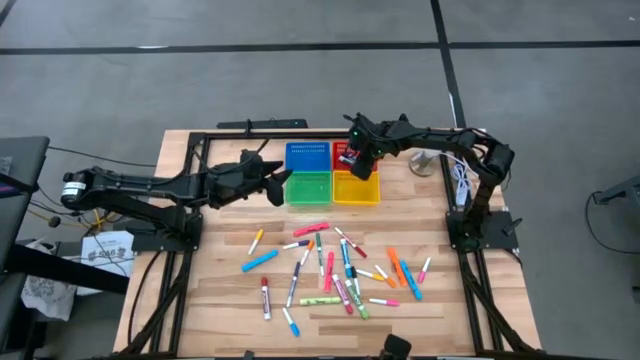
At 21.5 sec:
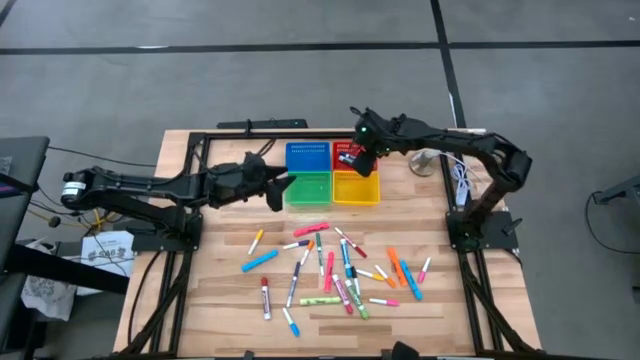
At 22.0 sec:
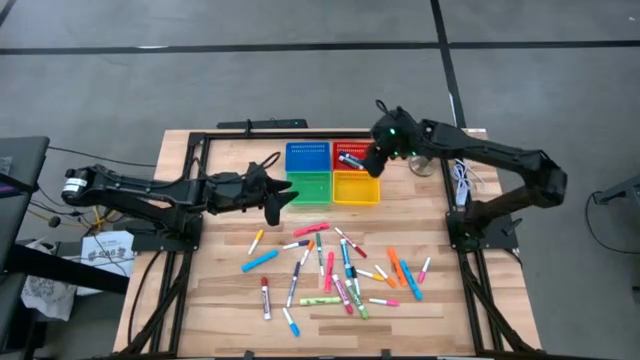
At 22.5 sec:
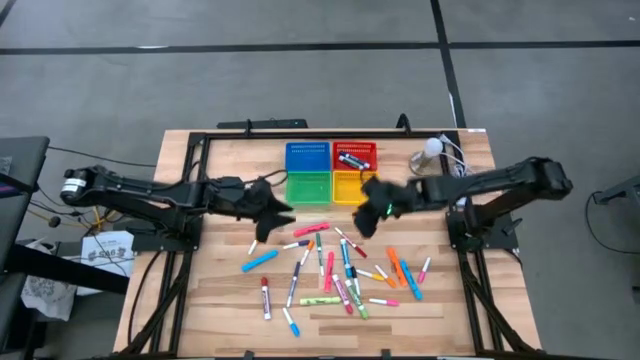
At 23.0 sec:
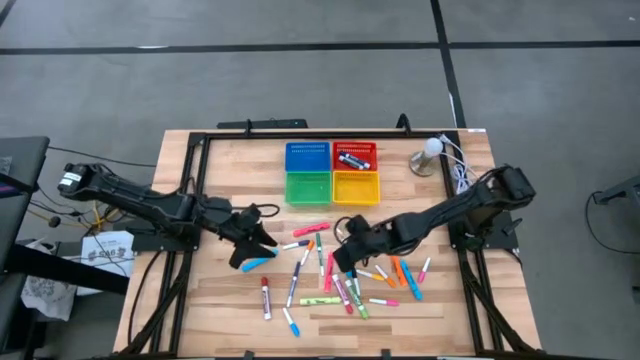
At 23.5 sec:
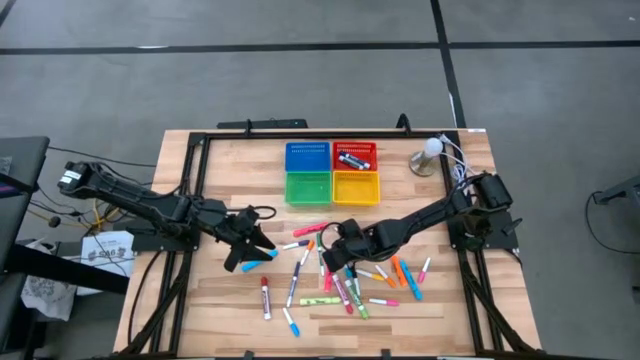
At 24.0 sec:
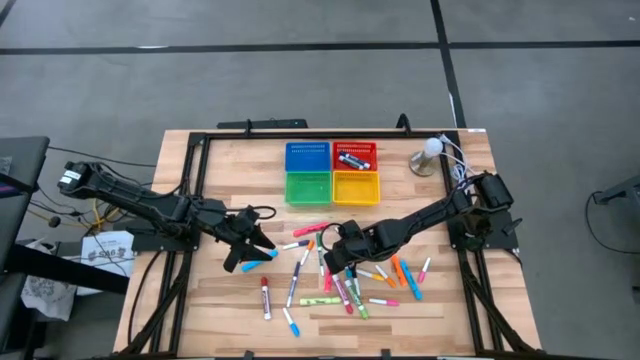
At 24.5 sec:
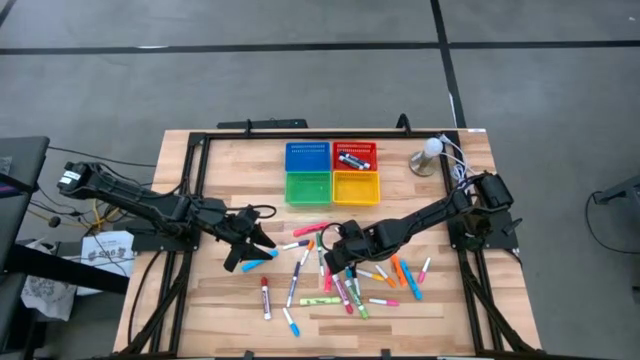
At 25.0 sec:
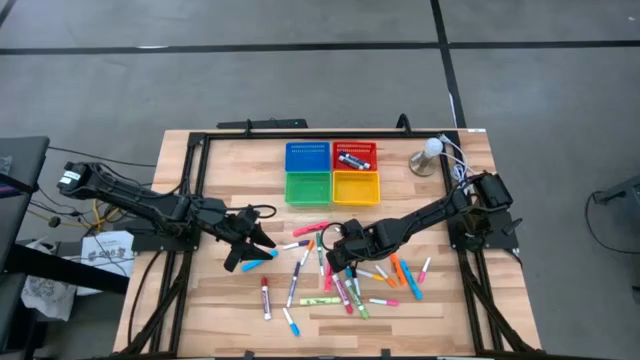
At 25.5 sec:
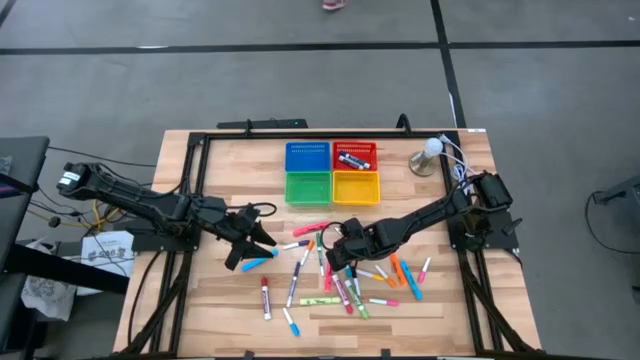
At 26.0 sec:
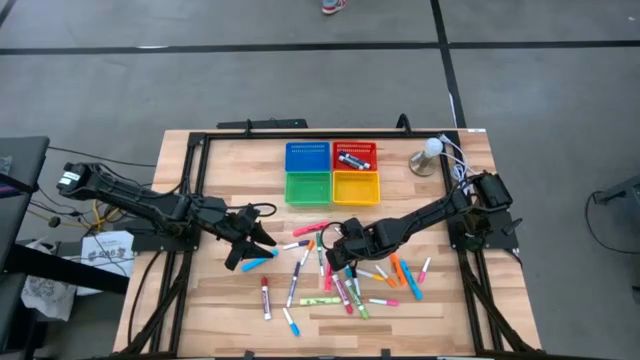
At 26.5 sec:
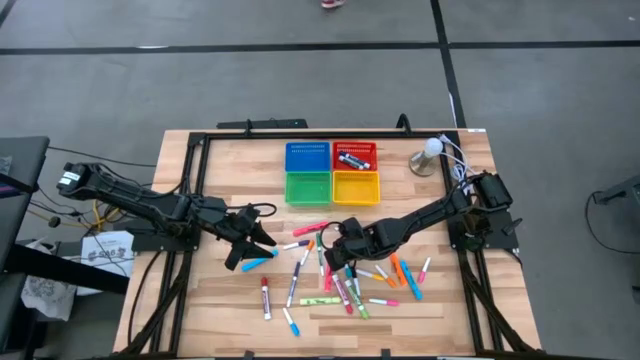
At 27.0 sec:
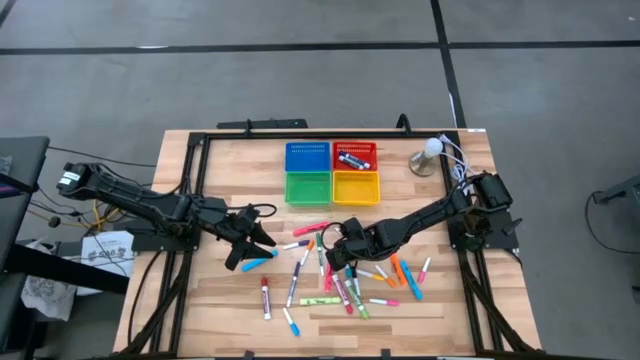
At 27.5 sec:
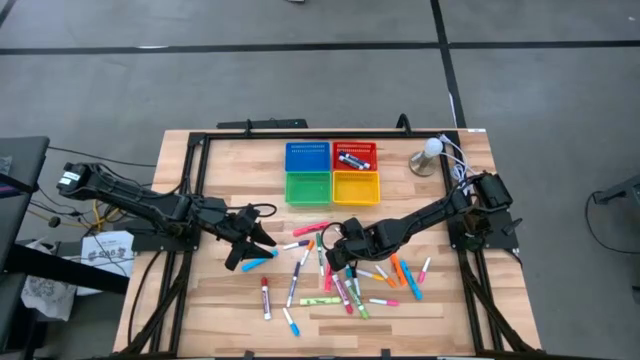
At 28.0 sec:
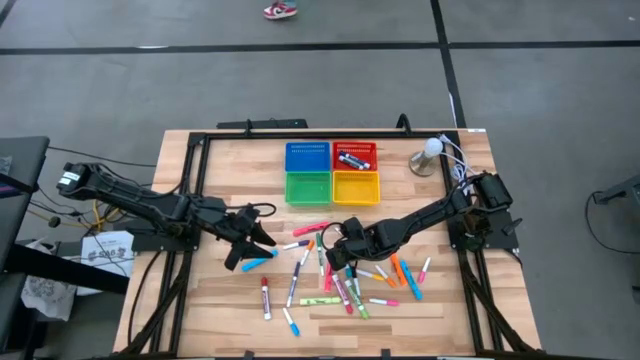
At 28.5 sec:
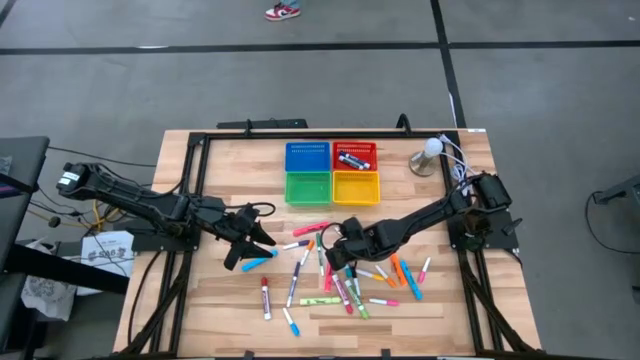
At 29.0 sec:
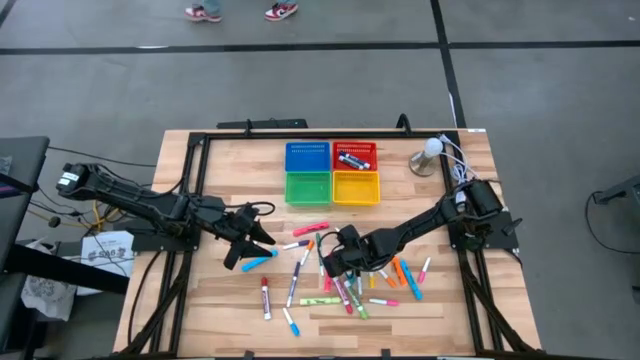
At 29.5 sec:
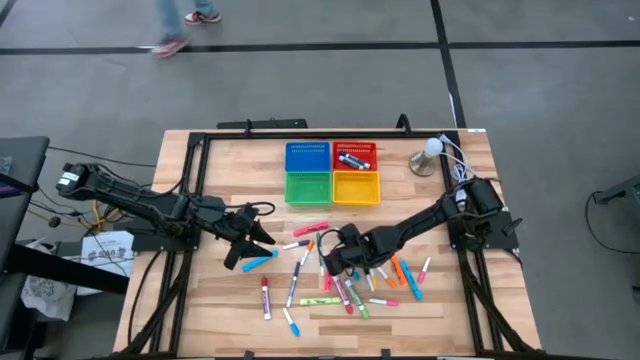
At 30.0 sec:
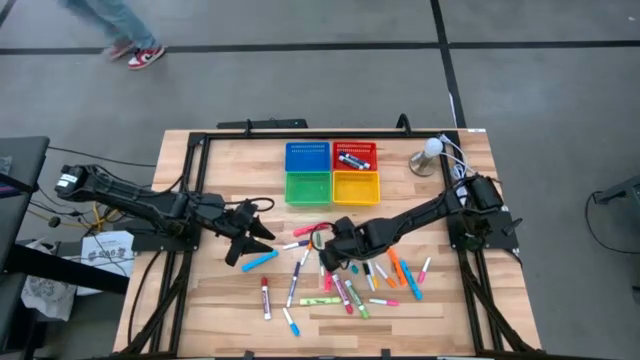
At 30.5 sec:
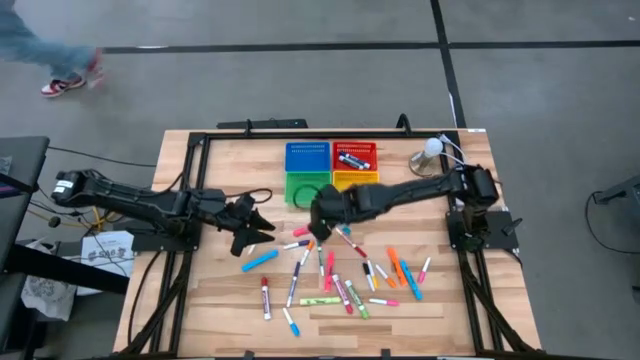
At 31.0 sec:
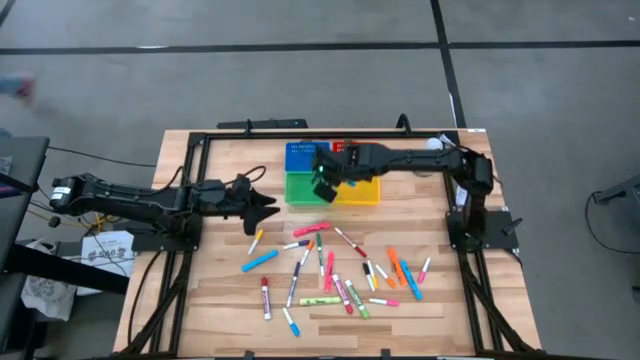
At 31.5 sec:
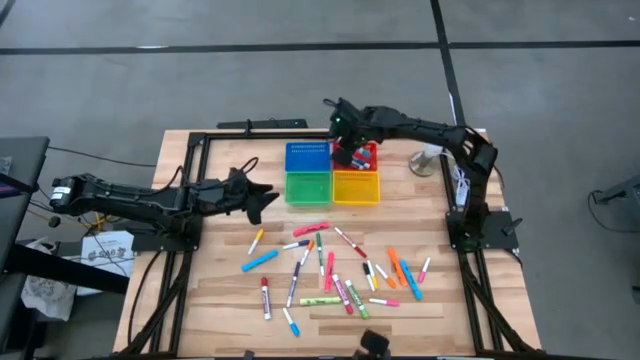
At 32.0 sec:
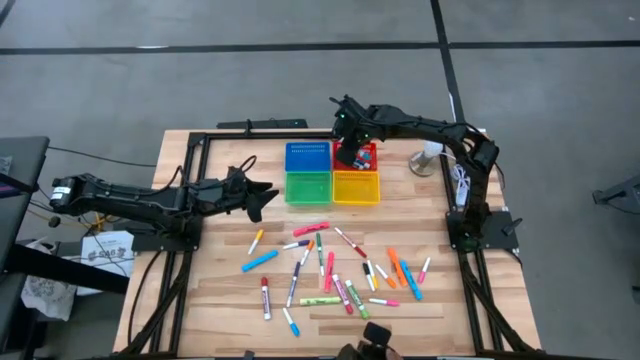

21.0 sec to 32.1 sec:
Task: Pick & Place Markers
Put the light blue thick dry erase marker into the red bin

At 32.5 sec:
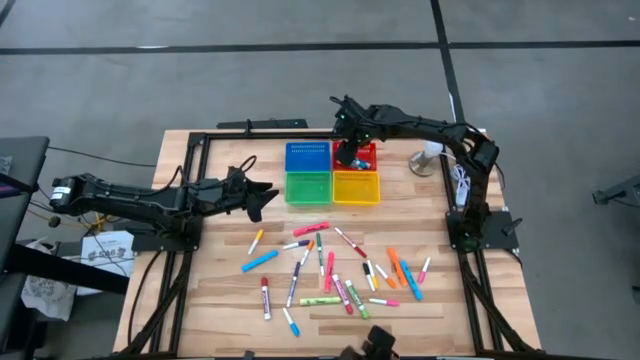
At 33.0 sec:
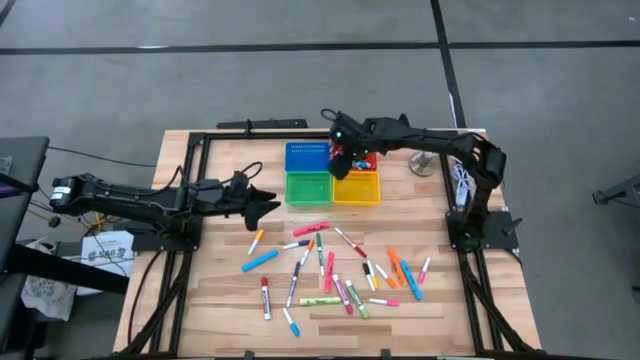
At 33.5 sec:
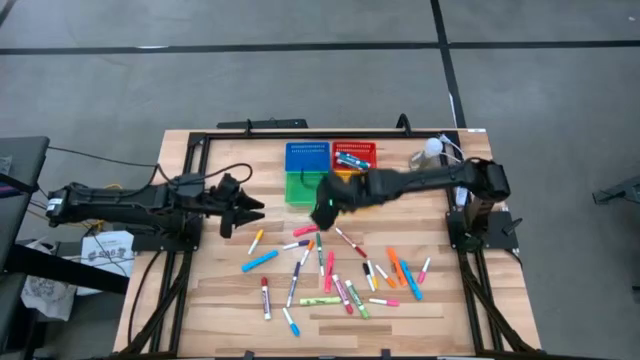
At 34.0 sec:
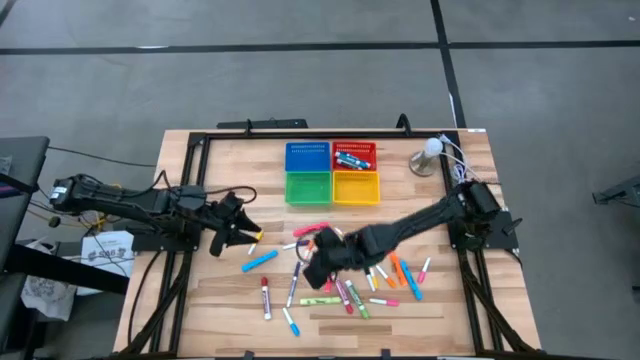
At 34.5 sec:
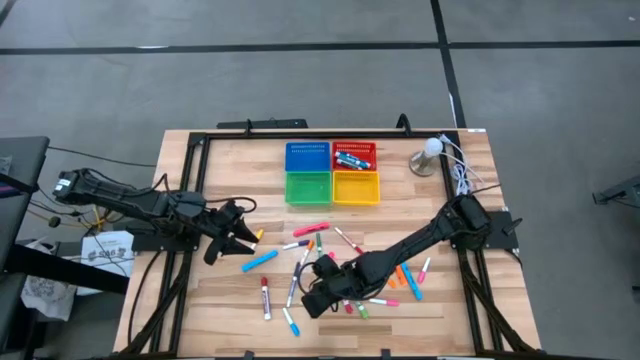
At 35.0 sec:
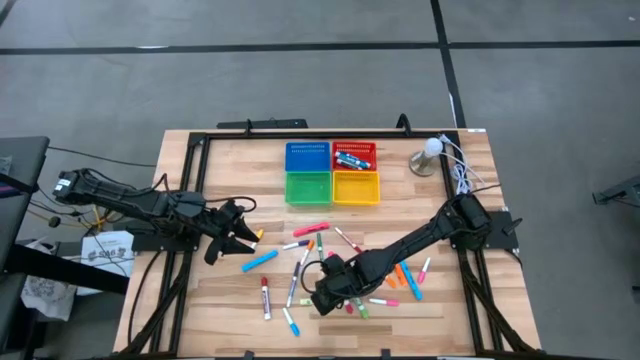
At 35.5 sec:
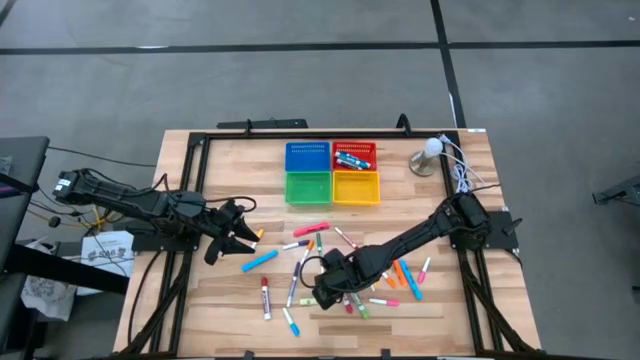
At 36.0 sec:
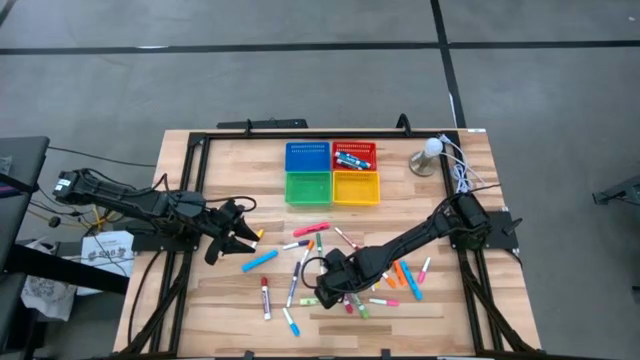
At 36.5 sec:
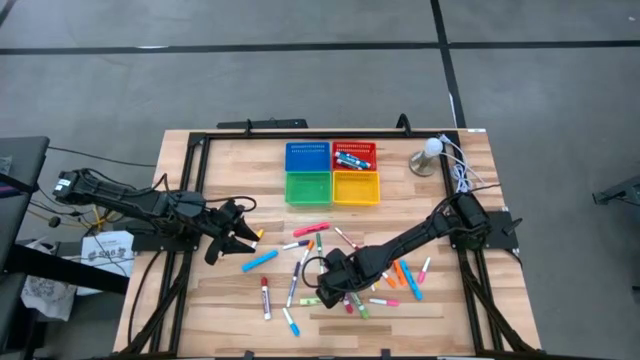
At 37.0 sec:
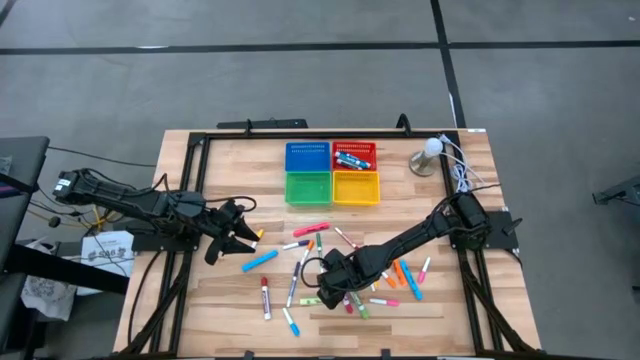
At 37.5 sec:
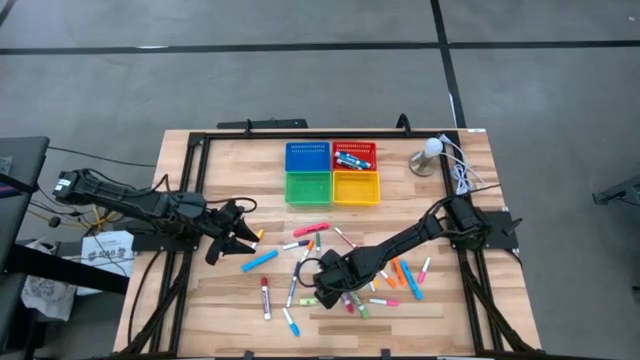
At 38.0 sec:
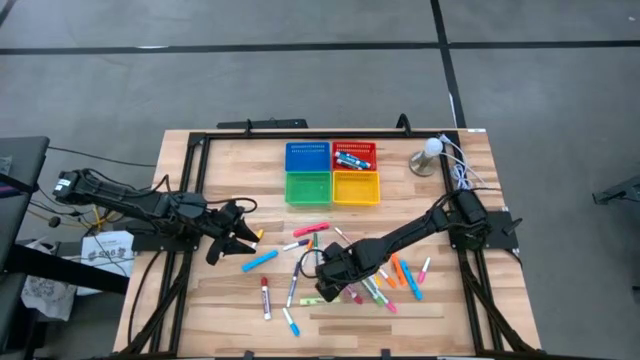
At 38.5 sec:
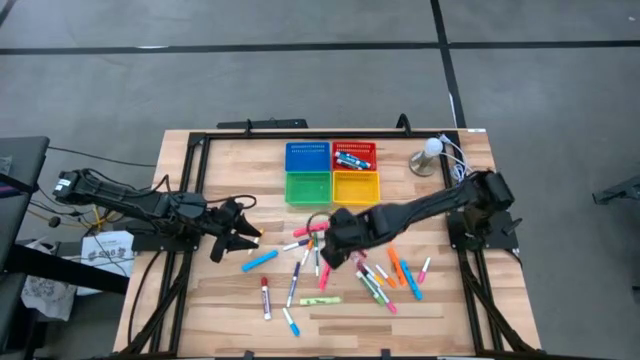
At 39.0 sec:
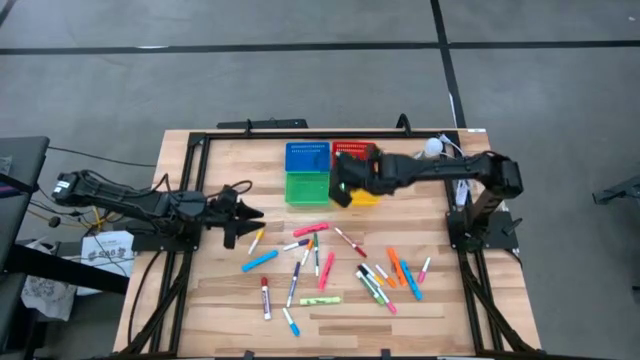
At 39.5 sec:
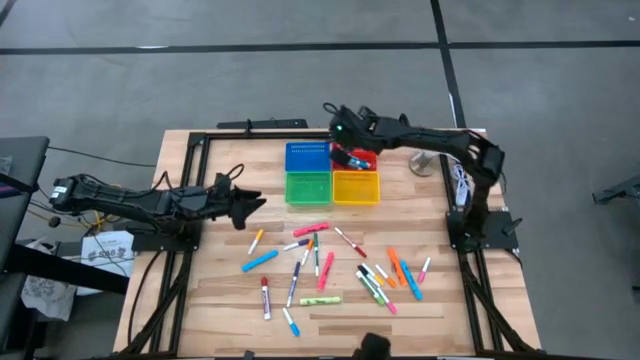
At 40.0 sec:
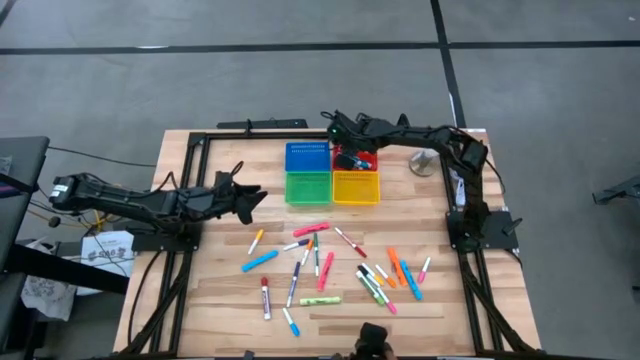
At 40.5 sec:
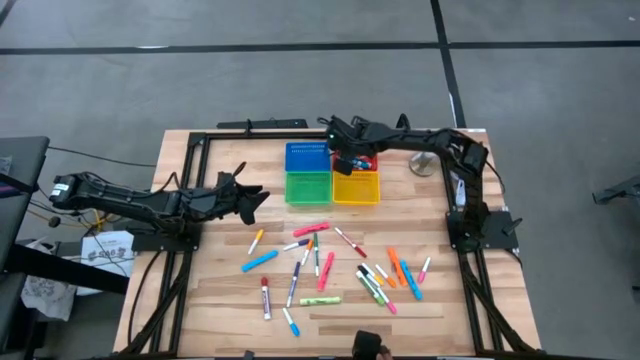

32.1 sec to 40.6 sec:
Put the pink thick dry erase marker into the red bin
